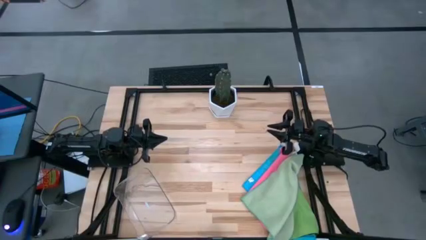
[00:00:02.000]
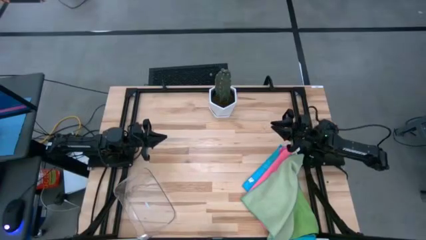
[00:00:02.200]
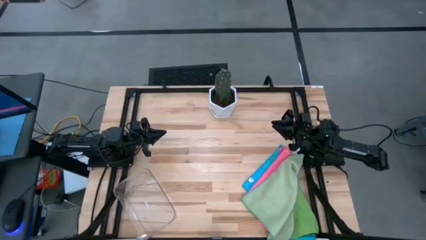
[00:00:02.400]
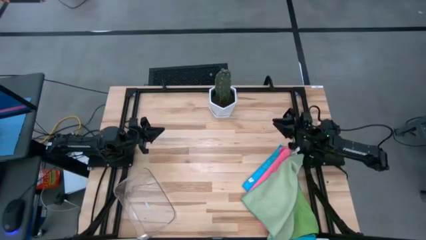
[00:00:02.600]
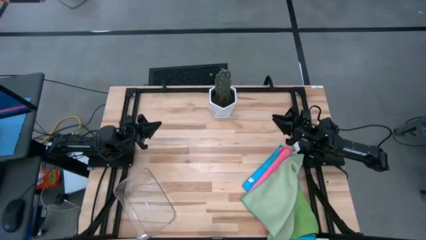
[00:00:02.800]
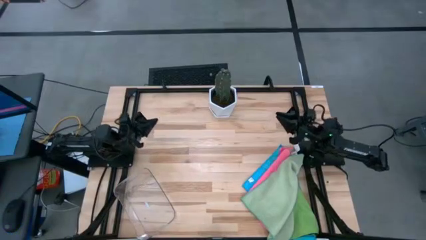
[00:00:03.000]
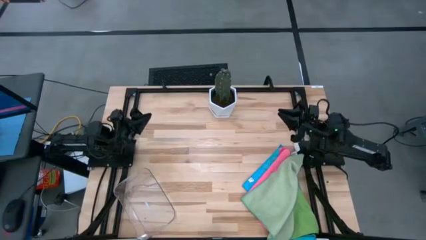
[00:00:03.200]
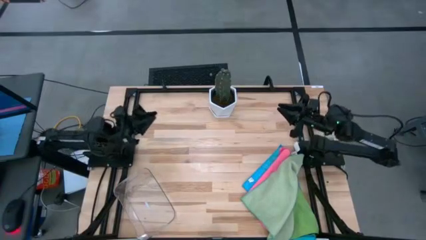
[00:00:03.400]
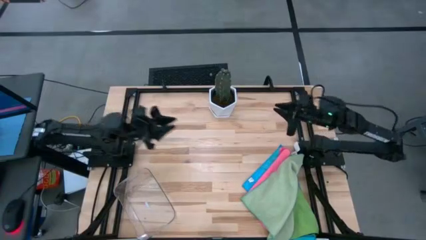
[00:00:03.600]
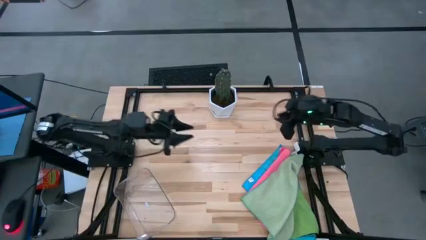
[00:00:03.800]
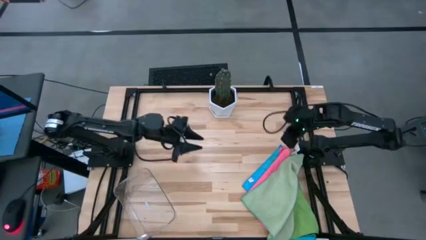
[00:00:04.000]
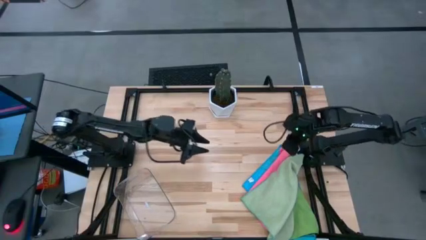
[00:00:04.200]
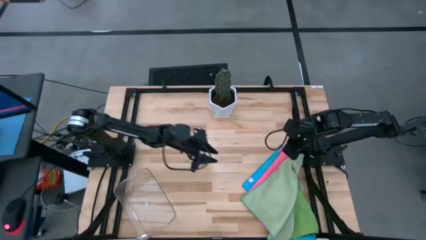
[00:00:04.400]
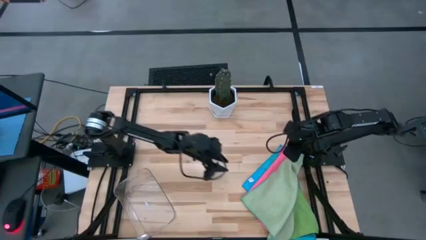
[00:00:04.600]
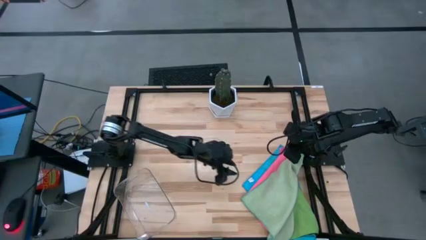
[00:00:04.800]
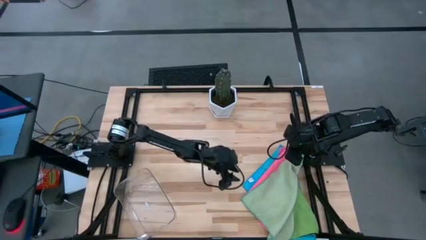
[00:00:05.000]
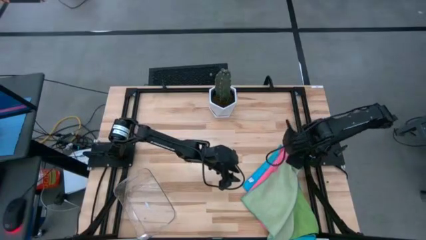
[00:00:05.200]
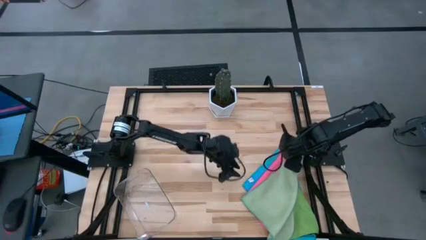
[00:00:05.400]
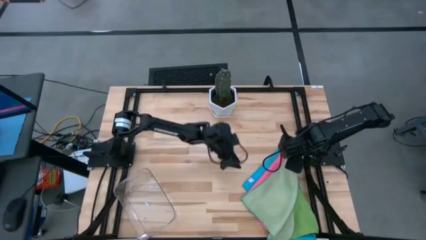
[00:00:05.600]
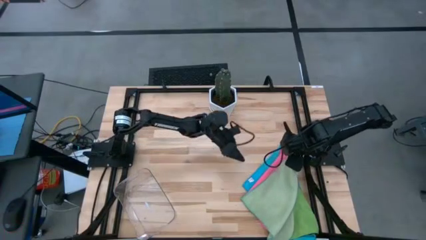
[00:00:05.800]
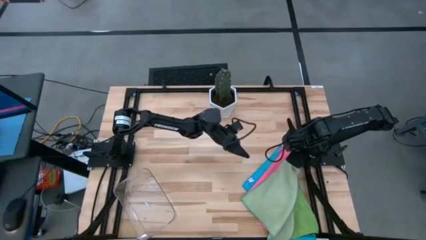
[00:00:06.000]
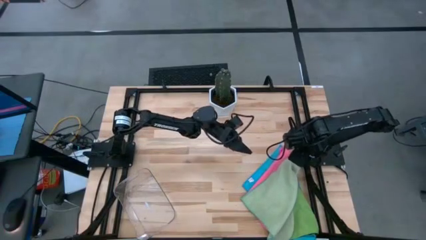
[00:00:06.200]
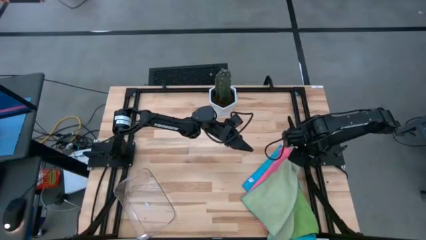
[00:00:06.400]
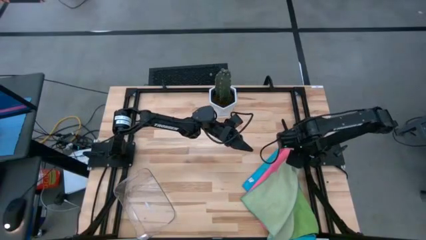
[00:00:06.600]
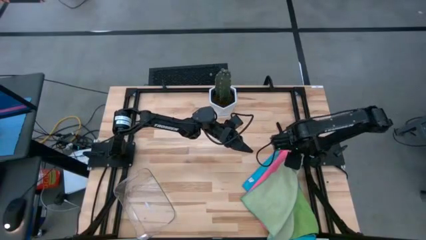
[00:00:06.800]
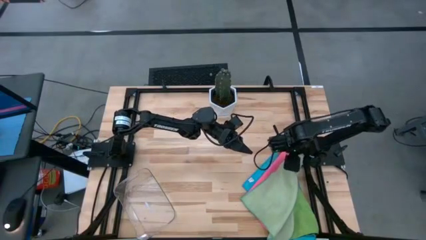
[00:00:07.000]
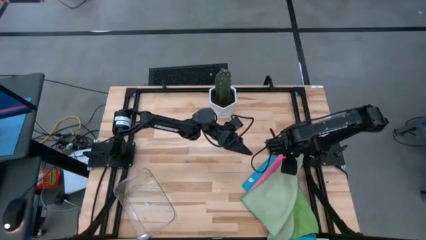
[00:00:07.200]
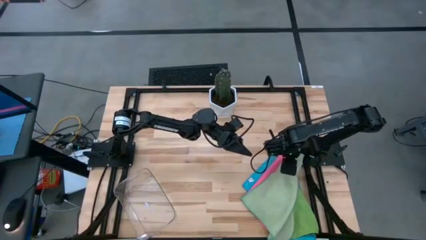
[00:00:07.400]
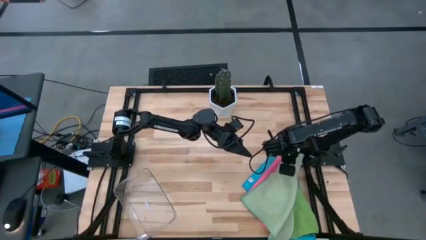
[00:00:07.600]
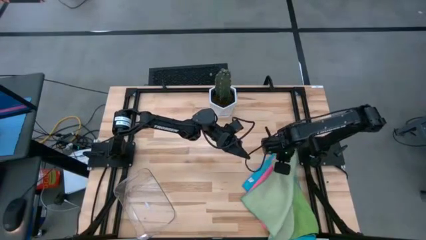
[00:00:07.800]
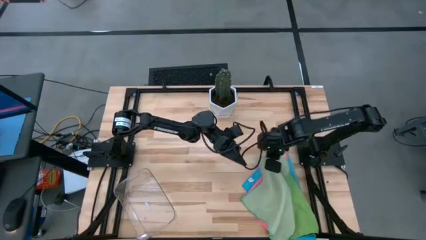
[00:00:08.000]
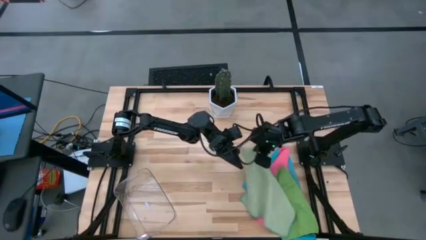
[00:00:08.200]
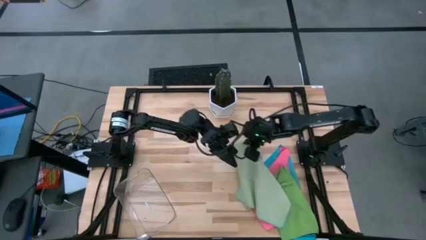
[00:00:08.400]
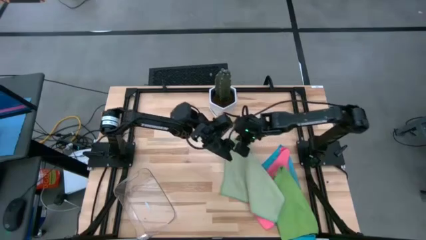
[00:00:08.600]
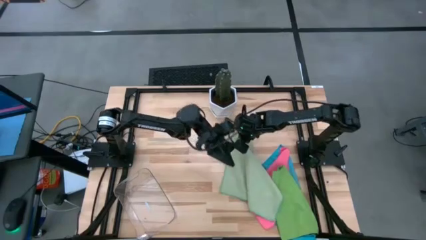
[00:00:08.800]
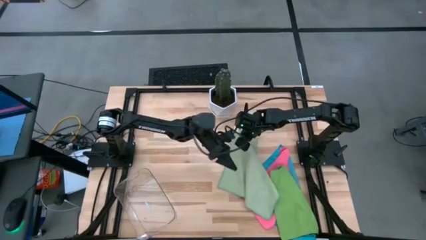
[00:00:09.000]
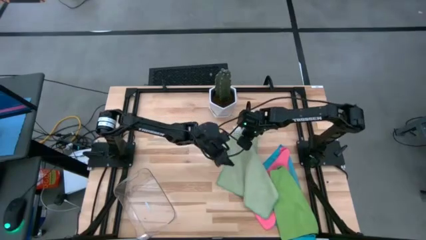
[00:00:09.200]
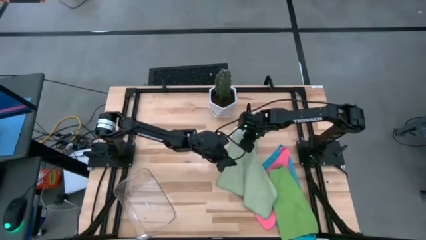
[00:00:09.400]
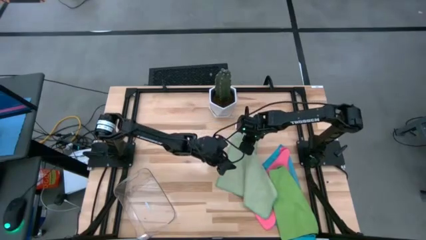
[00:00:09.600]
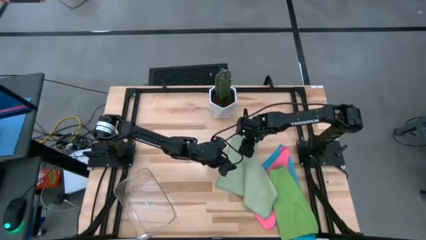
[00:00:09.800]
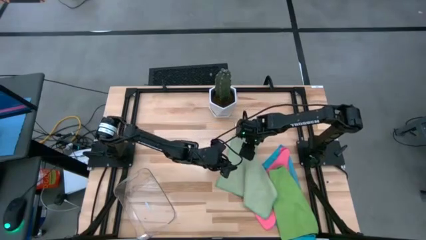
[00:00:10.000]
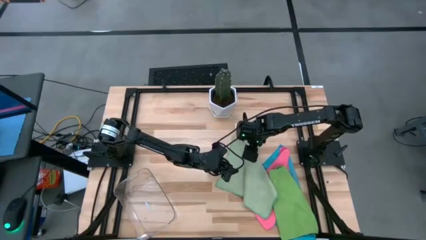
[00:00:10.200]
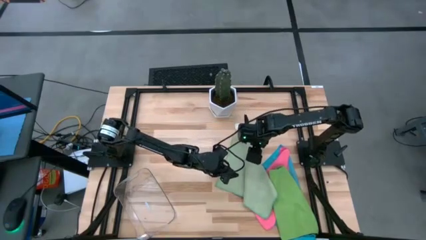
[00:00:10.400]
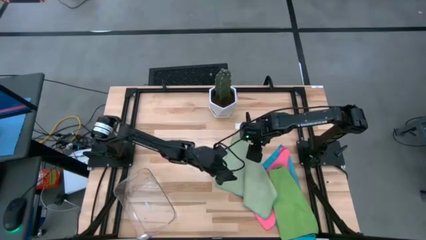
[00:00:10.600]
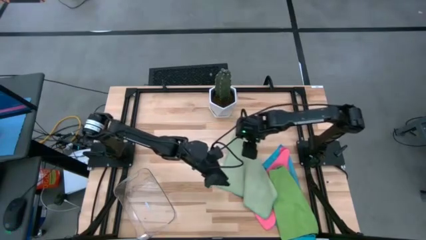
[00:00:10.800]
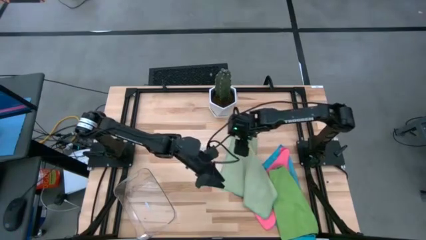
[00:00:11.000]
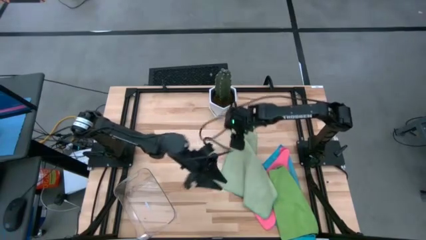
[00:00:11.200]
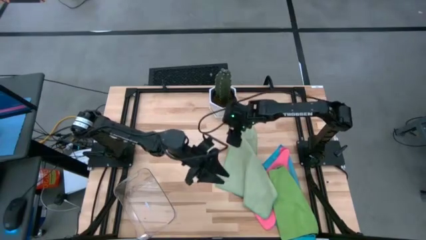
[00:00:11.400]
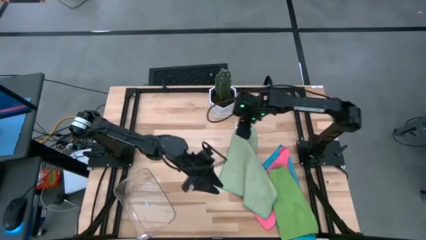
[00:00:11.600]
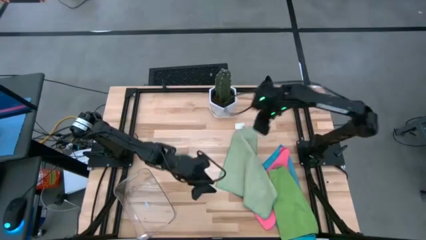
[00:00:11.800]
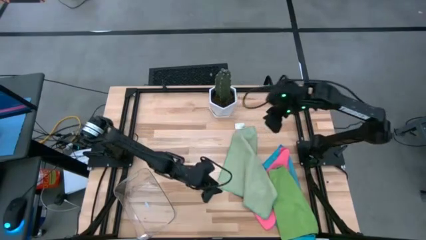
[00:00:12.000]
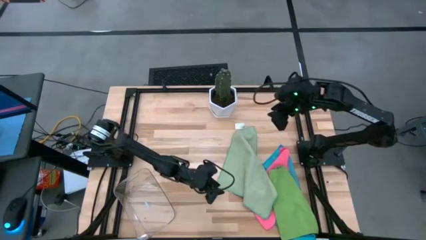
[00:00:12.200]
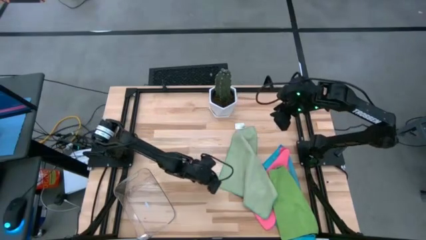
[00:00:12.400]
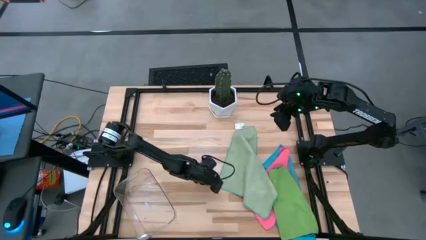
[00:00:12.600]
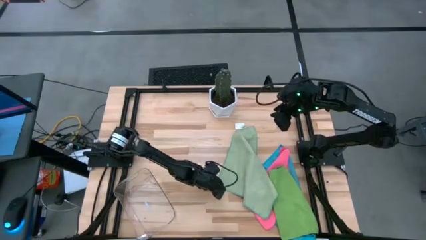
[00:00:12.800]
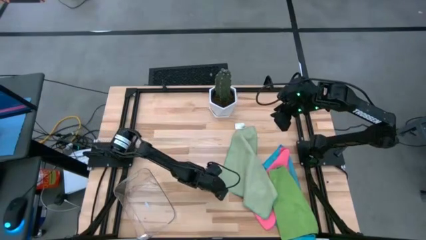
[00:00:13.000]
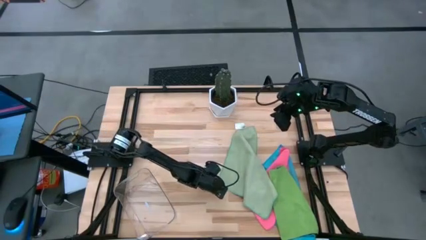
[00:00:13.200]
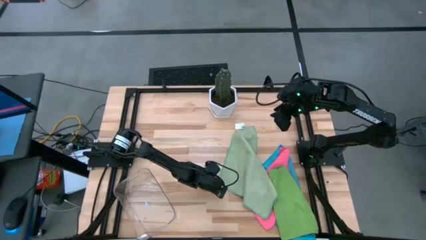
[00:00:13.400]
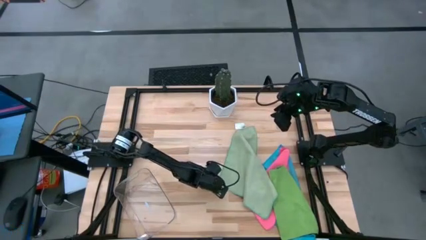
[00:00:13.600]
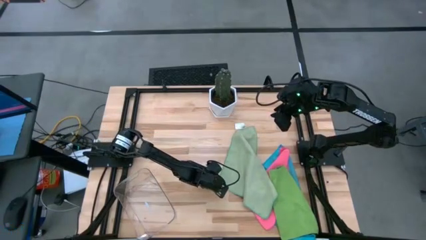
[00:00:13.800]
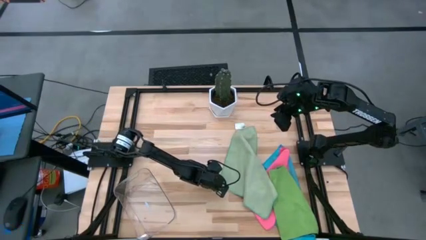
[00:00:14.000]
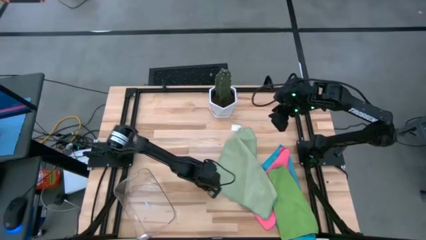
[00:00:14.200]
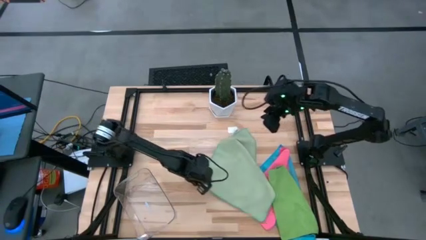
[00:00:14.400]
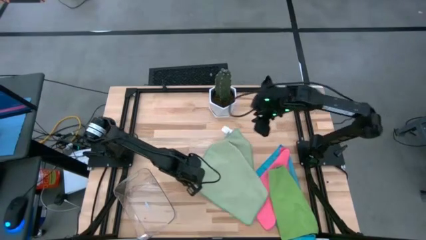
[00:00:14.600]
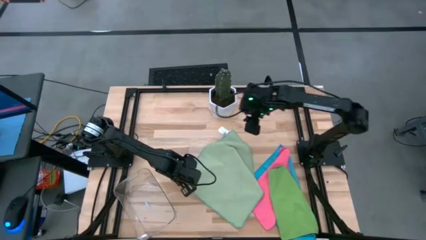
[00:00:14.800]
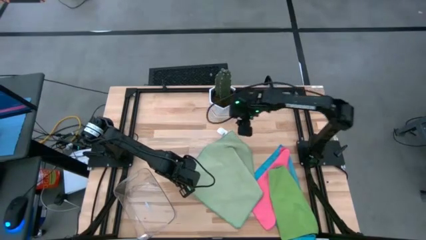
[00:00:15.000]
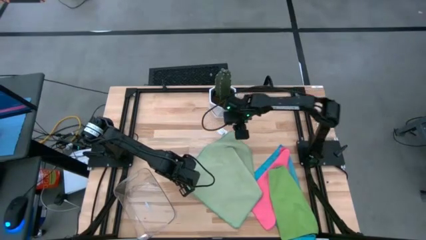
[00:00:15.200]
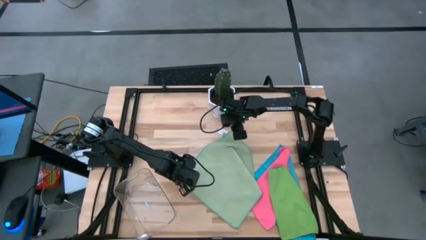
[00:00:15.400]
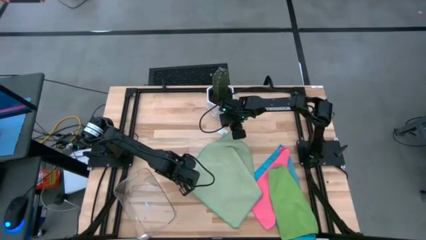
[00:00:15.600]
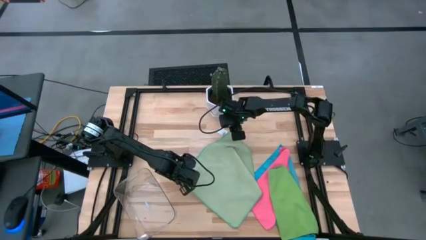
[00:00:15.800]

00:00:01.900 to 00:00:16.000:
Task: Fold microfiber towels
Fold the light green microfiber cloth
